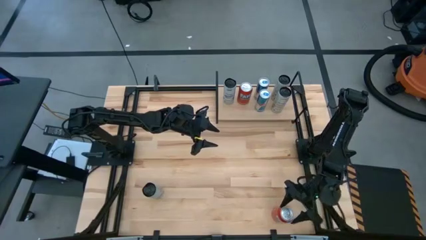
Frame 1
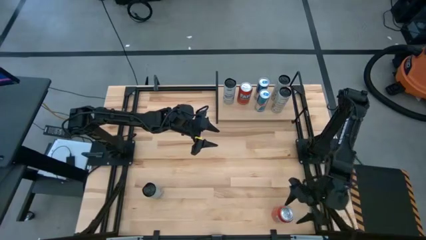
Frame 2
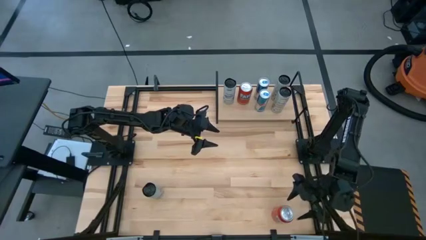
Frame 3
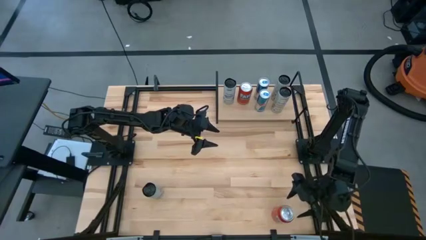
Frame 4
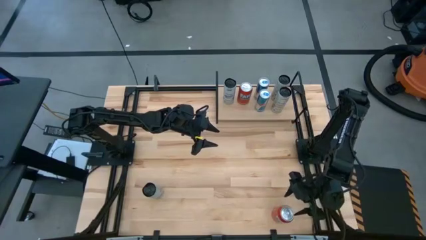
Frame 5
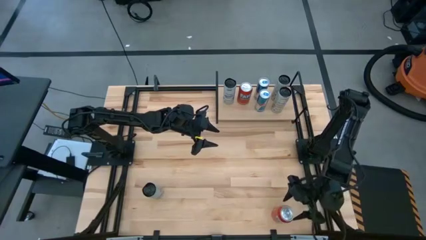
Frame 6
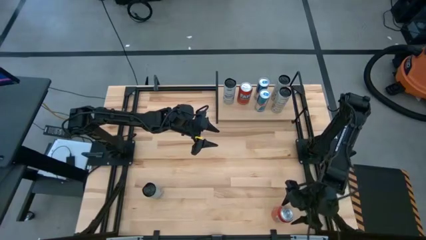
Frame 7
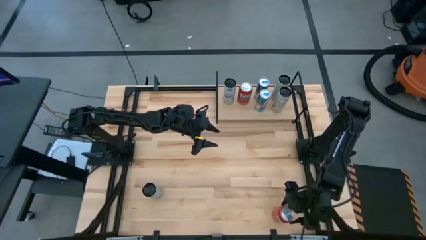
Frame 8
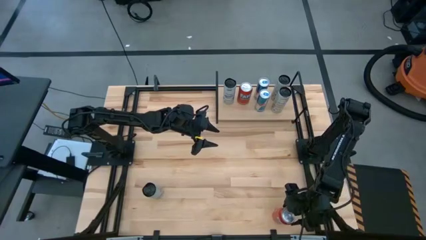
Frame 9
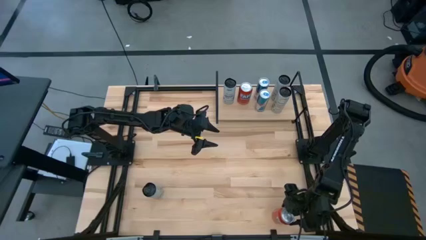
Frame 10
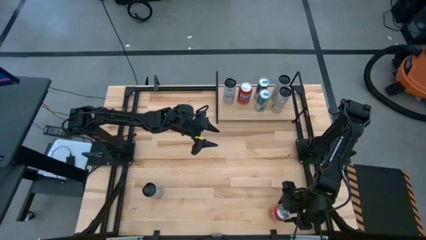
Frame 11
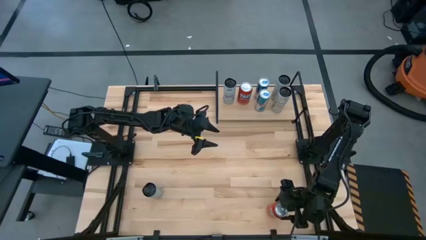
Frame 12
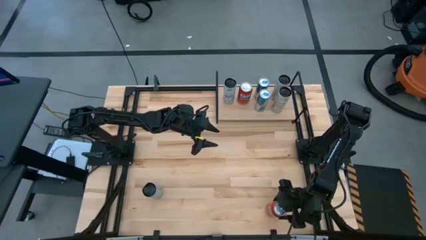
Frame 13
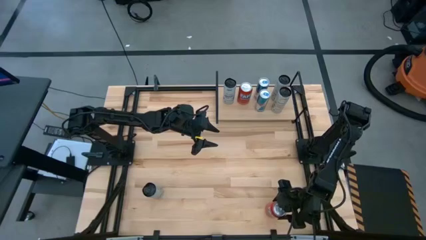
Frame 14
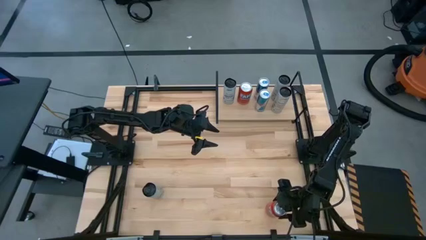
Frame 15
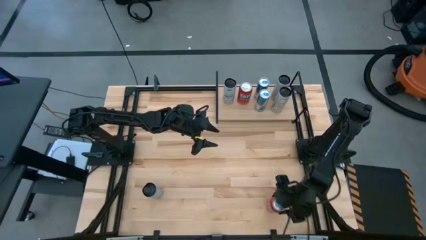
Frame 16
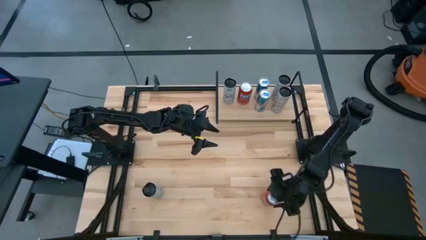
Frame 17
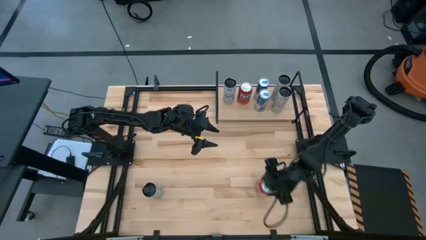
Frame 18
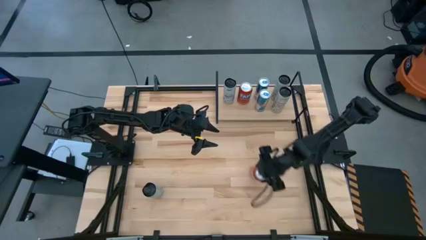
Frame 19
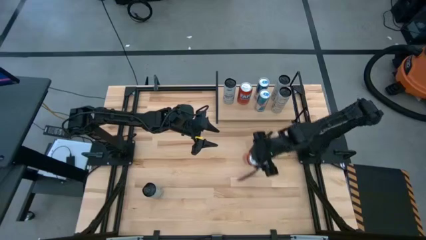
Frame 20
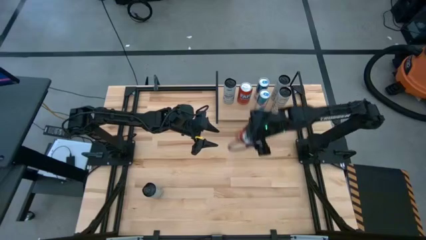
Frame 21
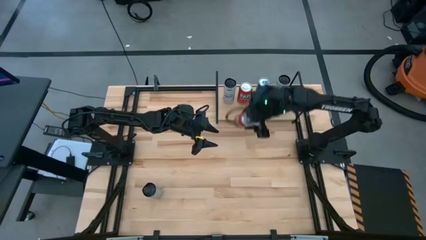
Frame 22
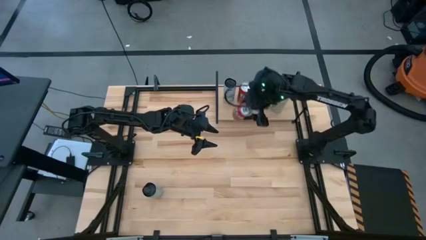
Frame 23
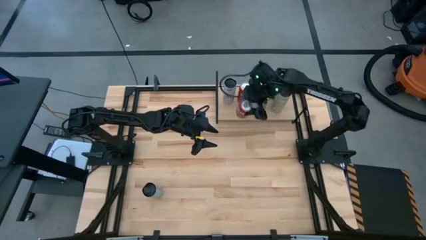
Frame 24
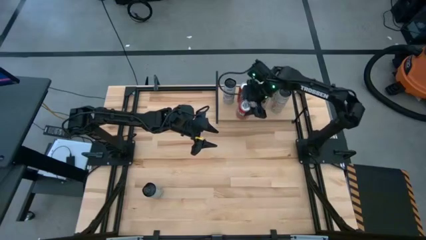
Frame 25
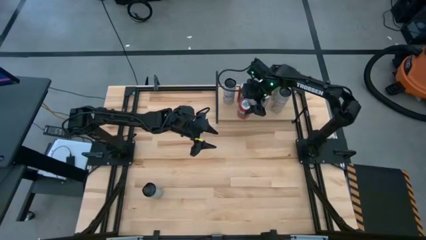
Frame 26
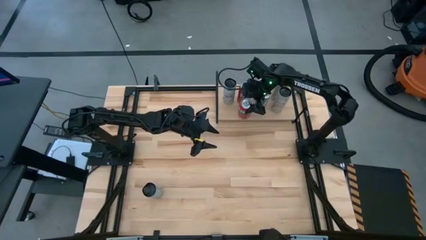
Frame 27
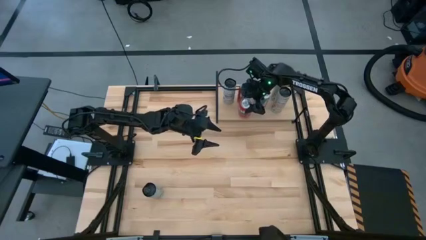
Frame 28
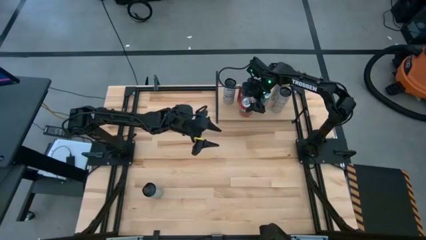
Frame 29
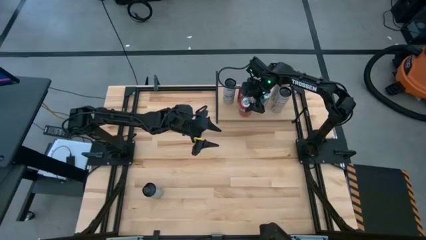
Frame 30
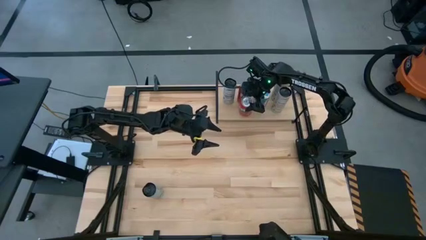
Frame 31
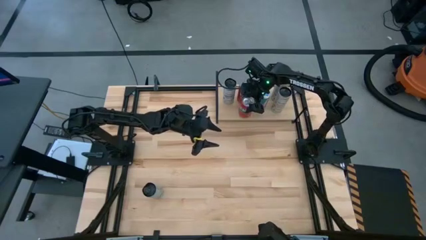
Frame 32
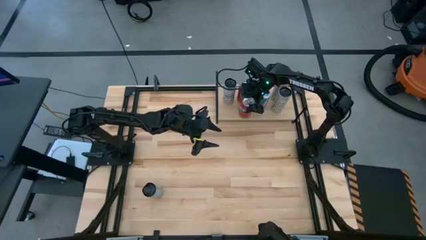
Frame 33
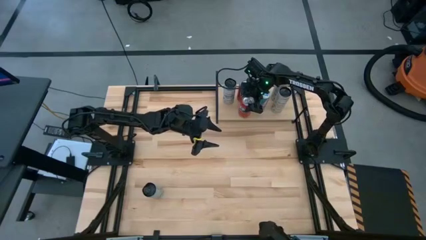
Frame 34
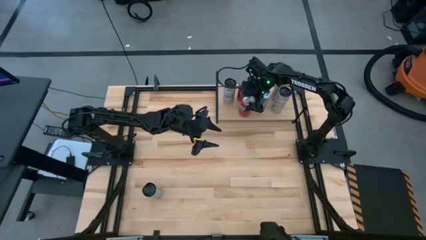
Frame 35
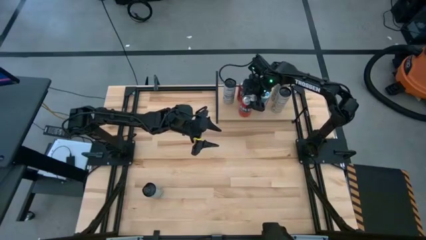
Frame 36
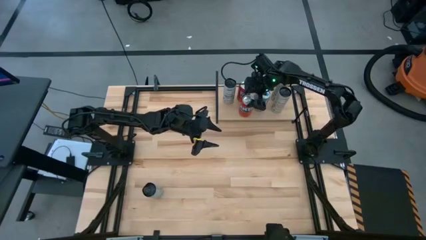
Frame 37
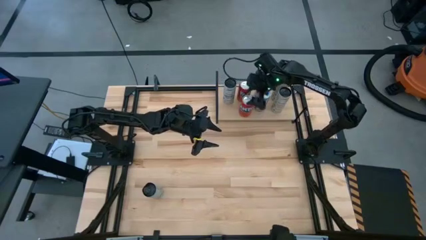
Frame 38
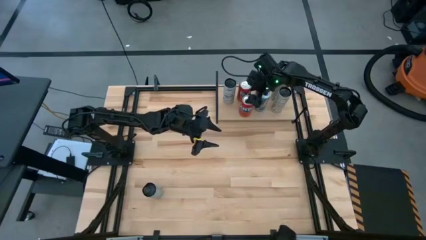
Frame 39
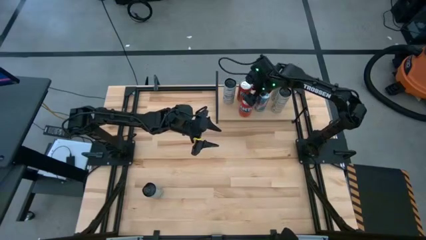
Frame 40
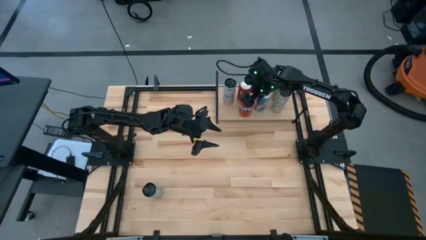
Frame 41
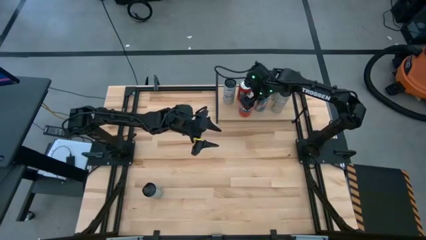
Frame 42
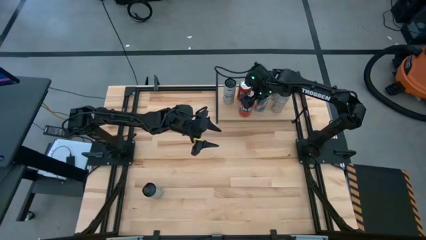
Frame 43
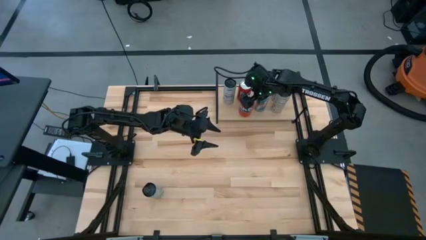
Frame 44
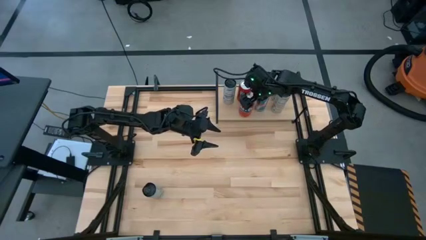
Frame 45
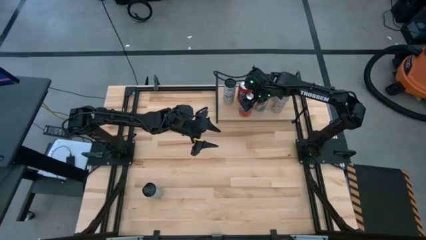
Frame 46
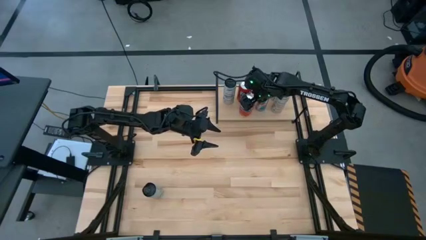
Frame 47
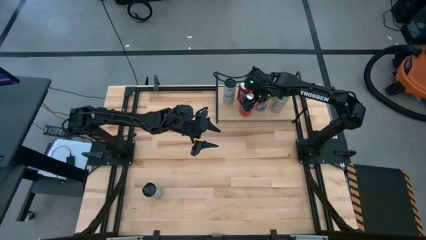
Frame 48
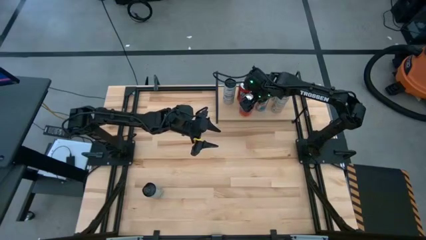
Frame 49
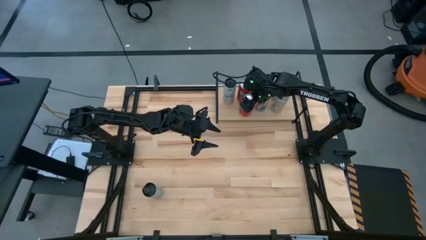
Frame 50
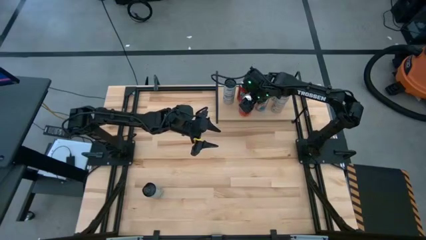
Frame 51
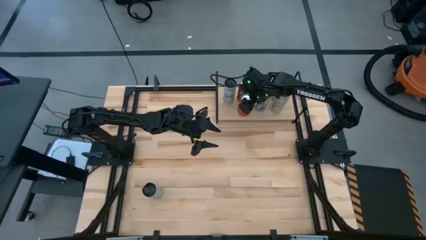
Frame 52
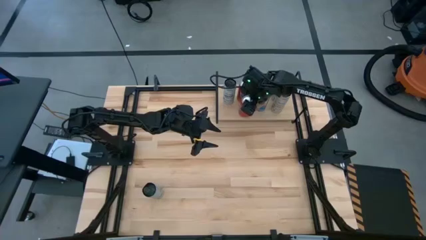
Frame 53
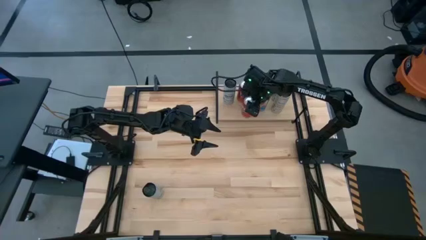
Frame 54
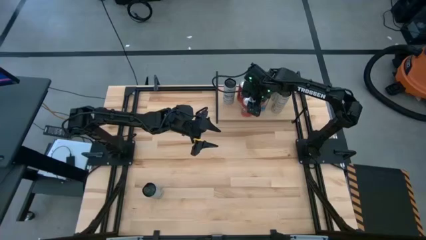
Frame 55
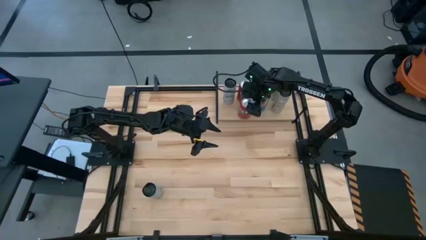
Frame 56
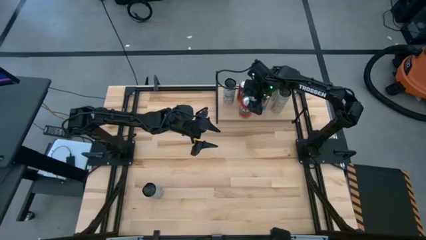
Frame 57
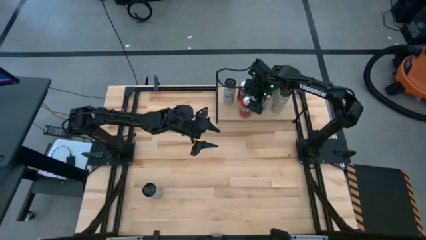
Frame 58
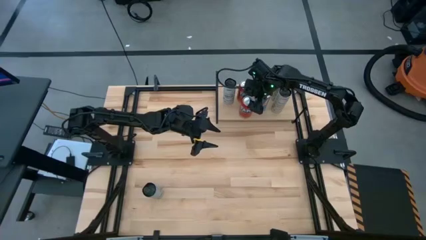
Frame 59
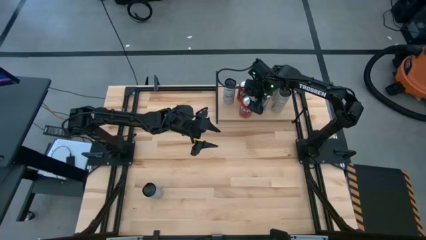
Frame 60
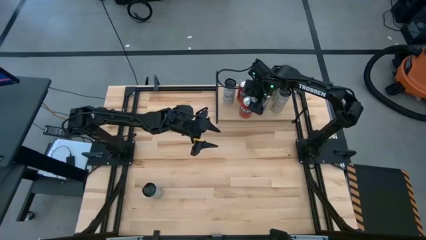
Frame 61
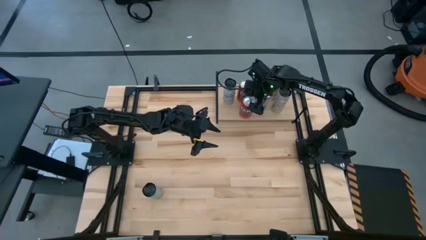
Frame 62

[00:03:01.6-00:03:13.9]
Task: Place canned beverage on shelf
Put the red soda can on the shelf aligned with the other red soda can

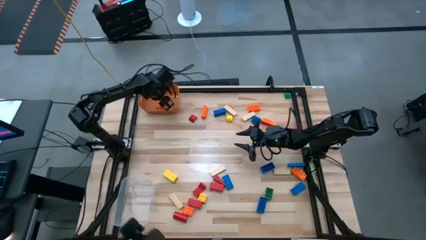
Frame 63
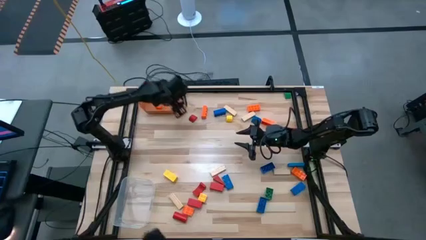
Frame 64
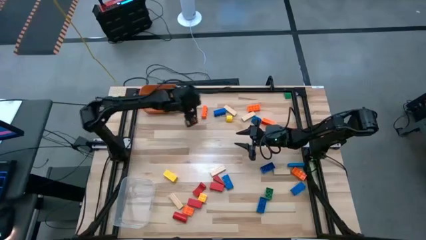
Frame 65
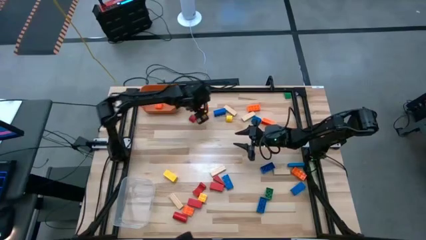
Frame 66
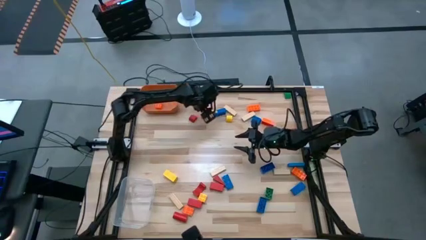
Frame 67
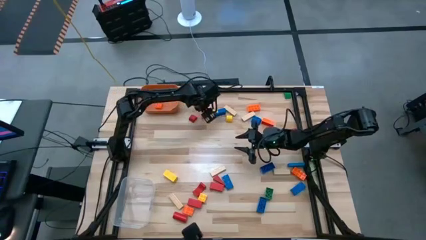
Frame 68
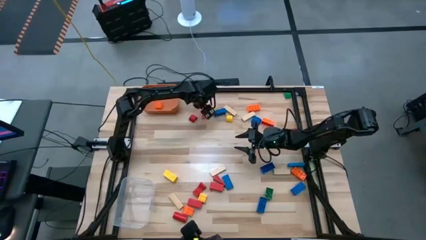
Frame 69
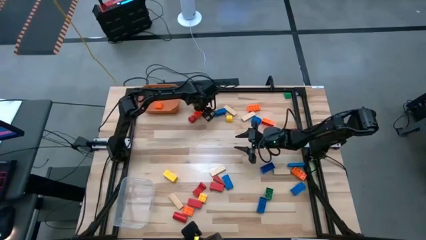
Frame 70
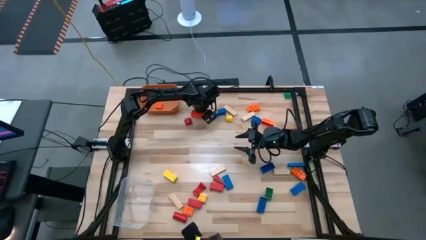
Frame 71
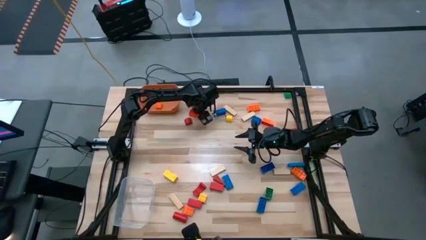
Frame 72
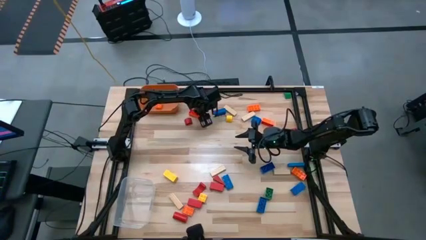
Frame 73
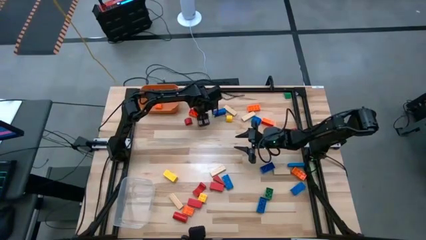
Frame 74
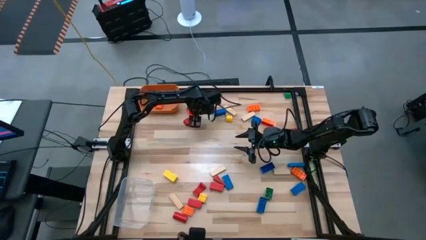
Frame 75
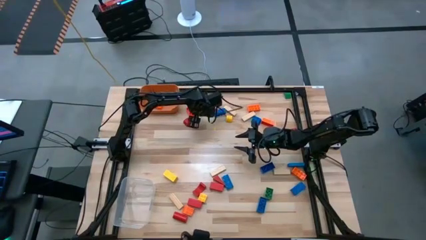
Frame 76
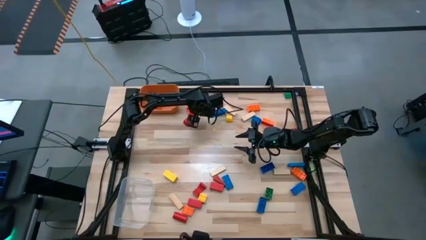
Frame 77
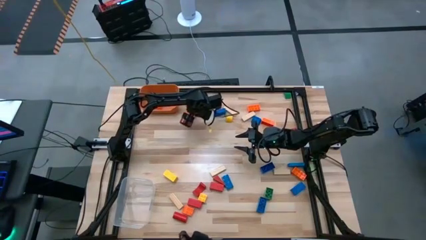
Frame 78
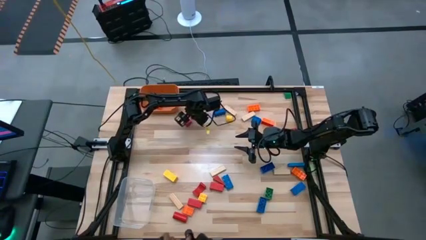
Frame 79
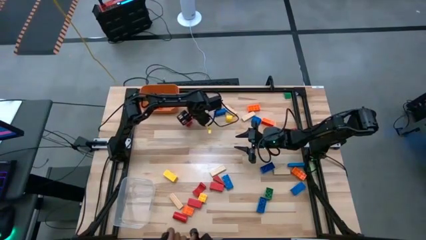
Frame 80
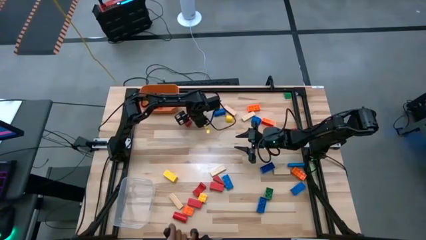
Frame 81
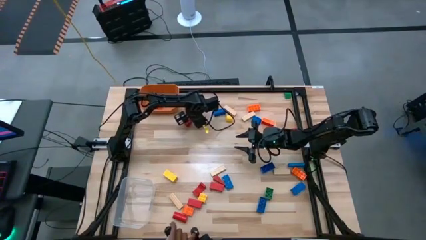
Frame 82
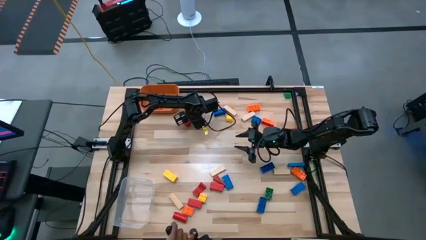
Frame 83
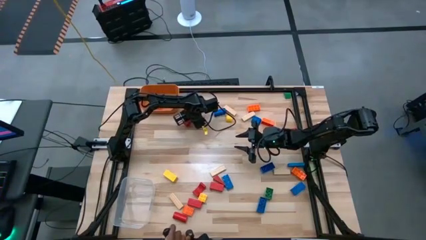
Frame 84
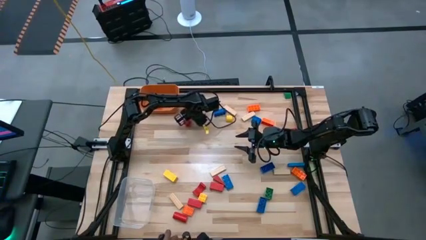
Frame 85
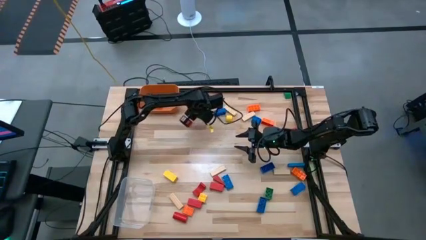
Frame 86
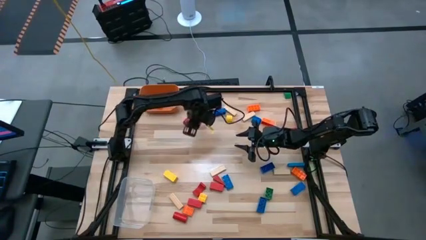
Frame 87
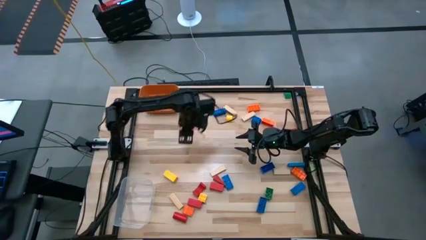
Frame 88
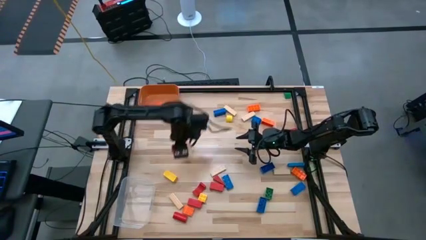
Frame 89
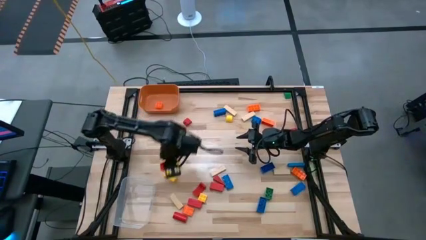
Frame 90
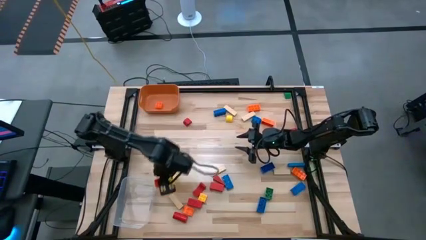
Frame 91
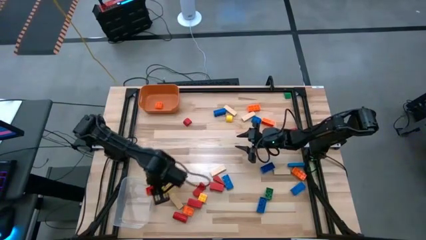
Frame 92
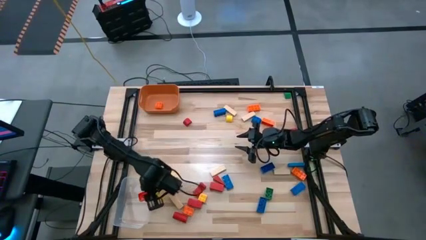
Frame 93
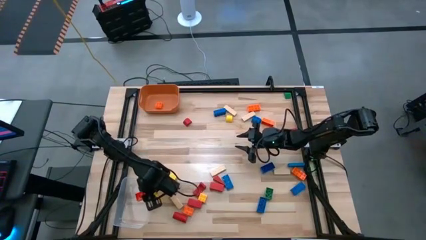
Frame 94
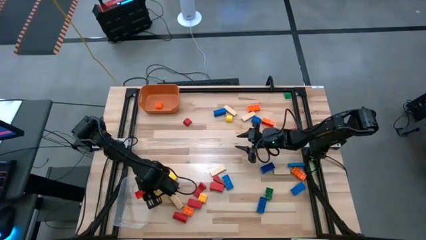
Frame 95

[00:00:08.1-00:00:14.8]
Task: Sort blocks by size
Put the large orange game piece into the transparent bin
